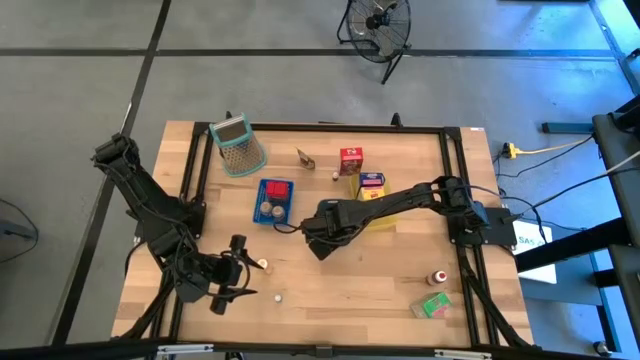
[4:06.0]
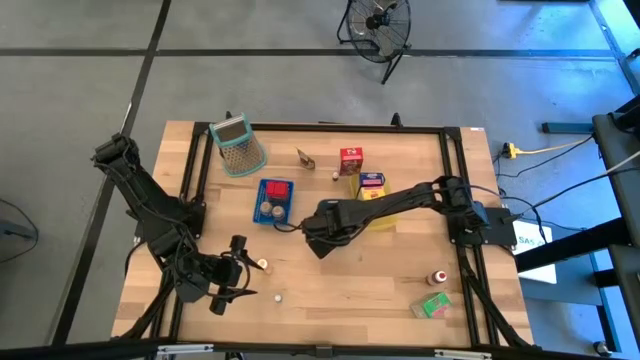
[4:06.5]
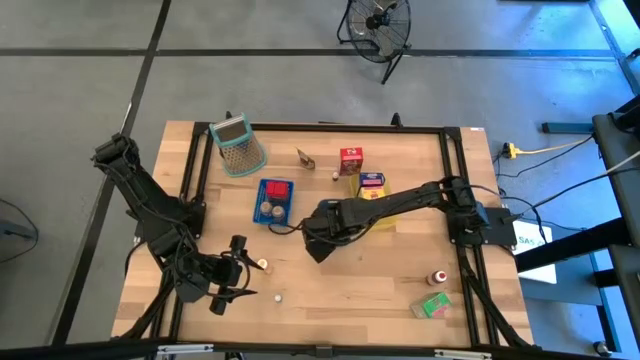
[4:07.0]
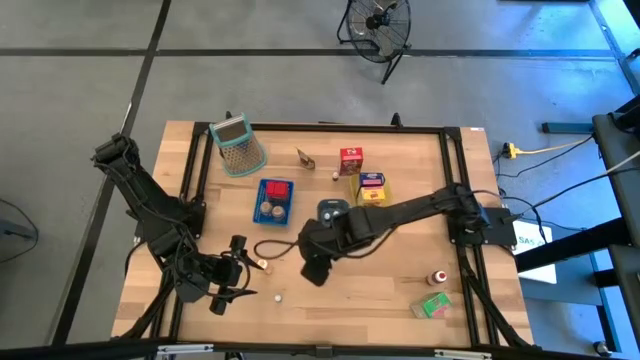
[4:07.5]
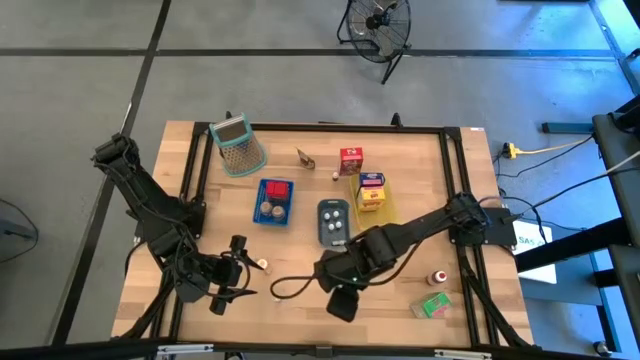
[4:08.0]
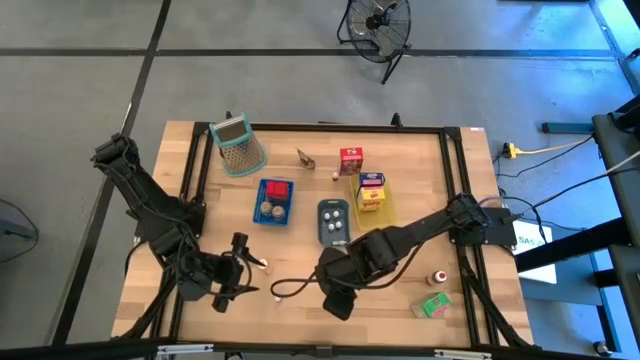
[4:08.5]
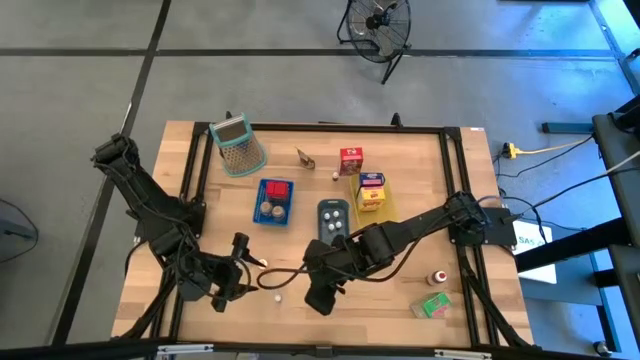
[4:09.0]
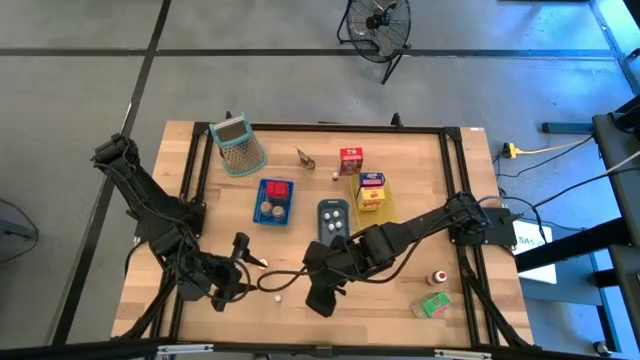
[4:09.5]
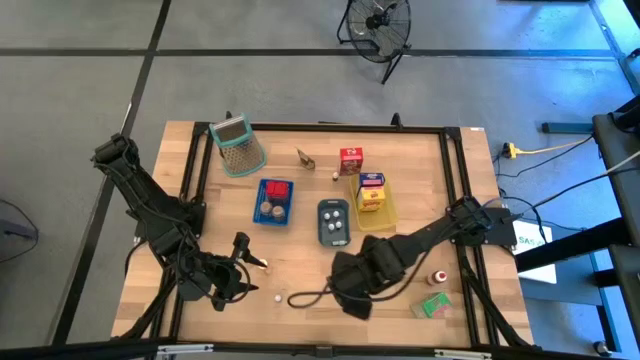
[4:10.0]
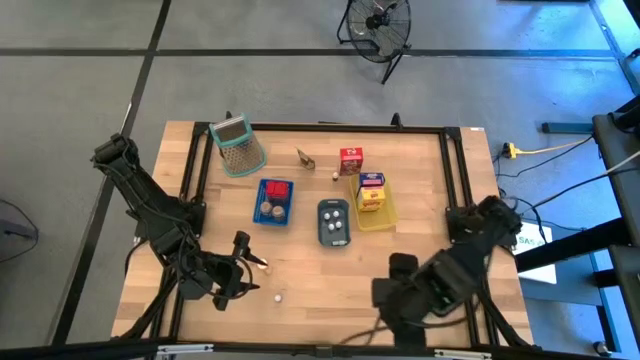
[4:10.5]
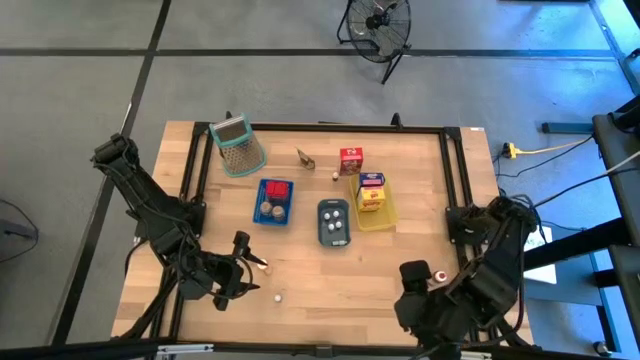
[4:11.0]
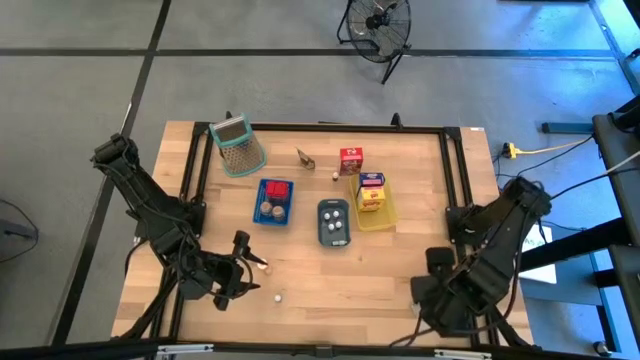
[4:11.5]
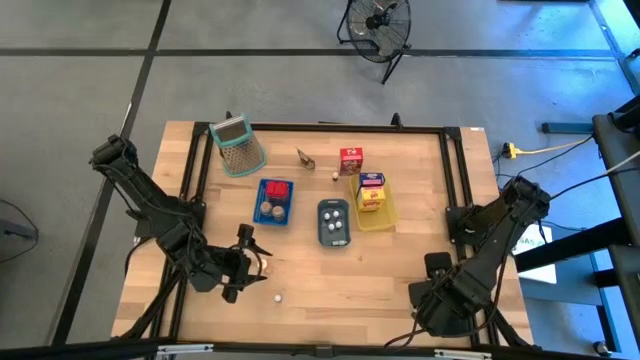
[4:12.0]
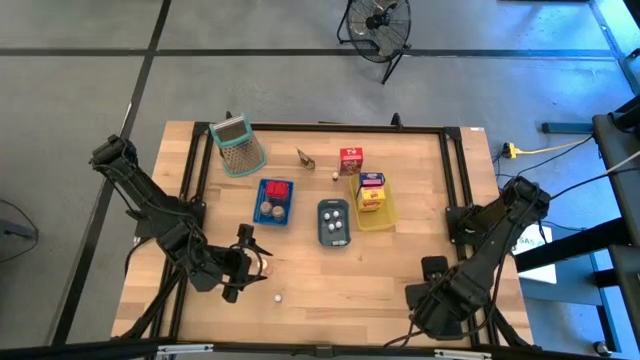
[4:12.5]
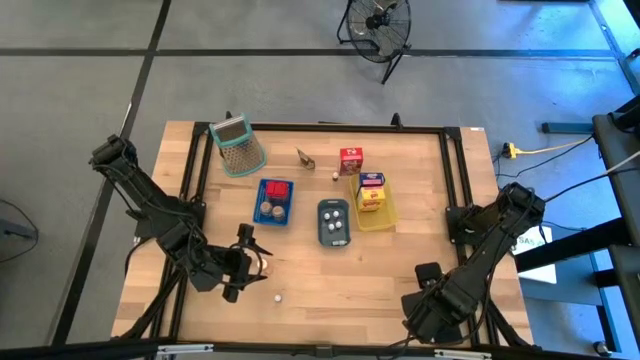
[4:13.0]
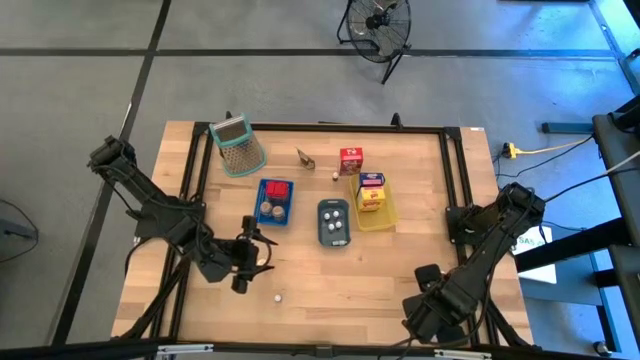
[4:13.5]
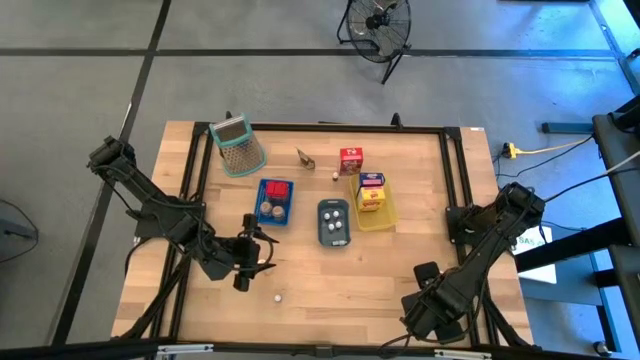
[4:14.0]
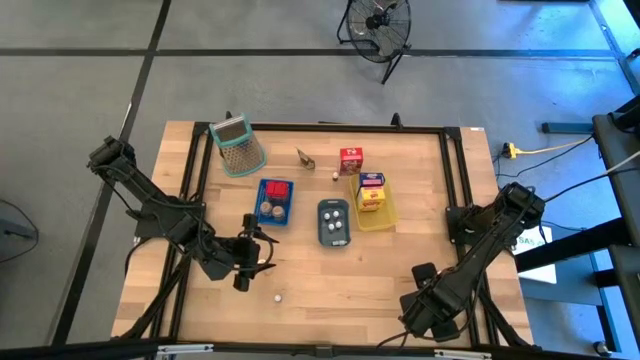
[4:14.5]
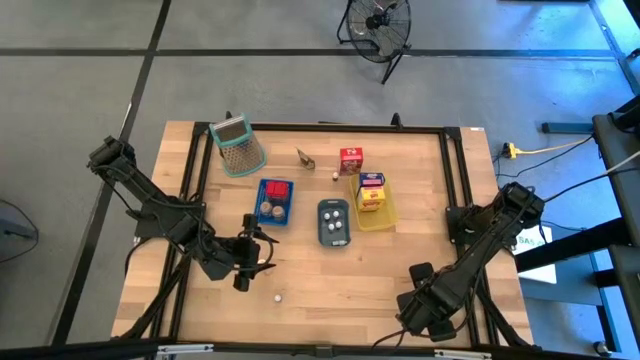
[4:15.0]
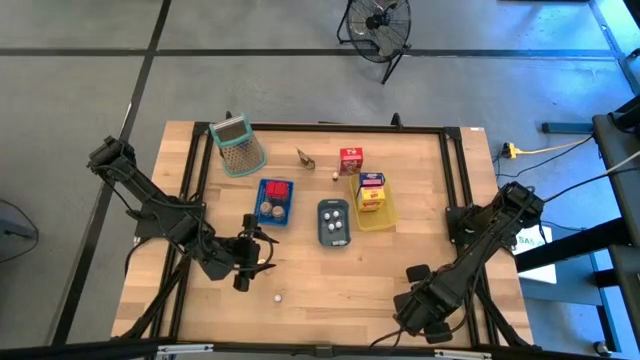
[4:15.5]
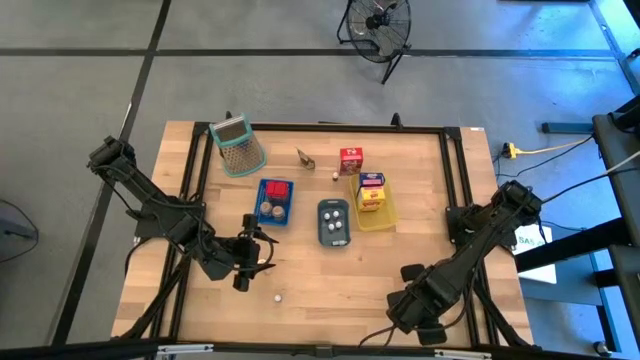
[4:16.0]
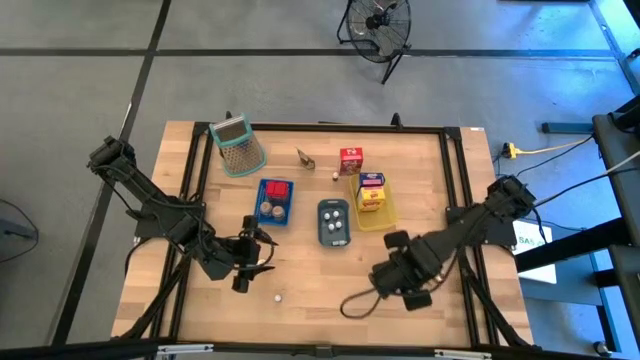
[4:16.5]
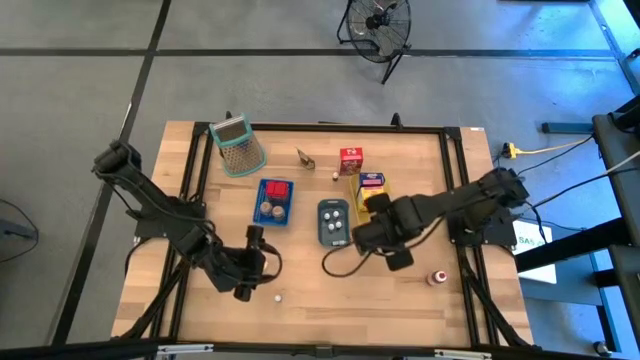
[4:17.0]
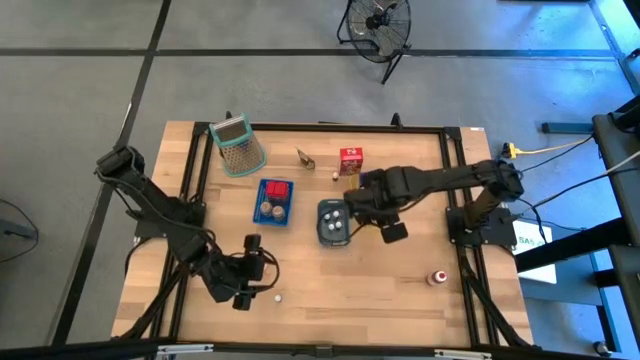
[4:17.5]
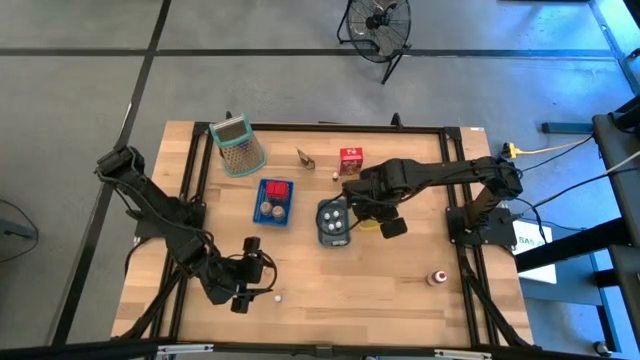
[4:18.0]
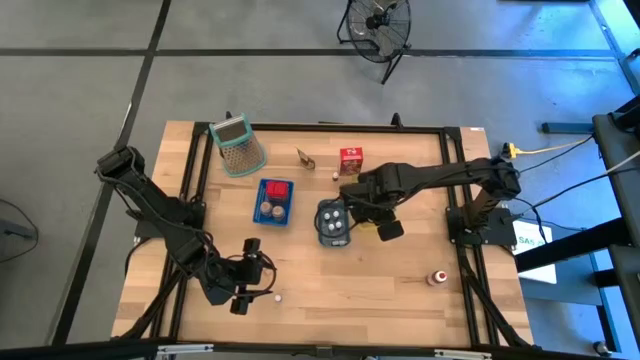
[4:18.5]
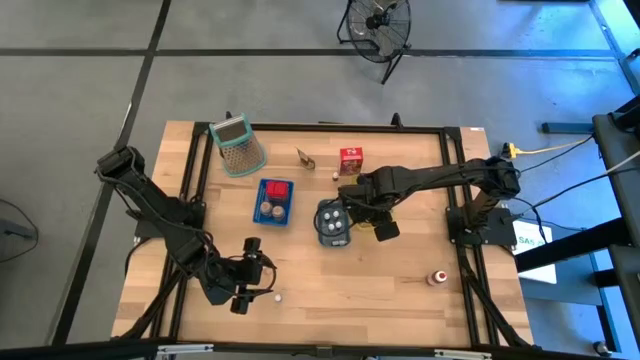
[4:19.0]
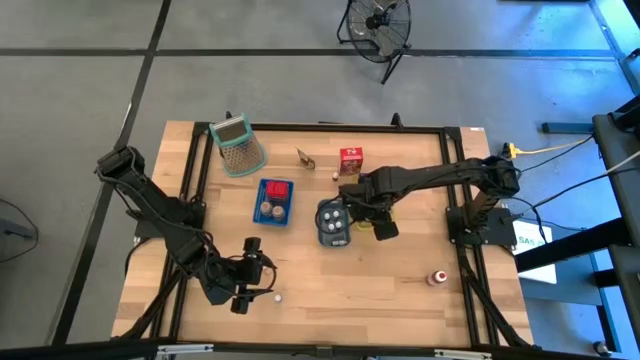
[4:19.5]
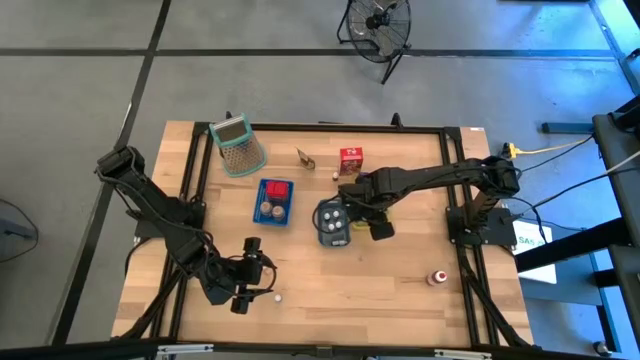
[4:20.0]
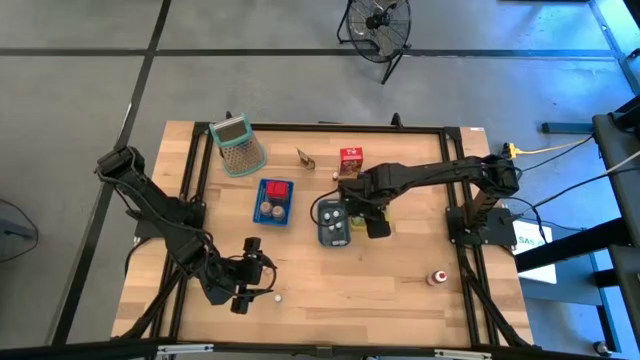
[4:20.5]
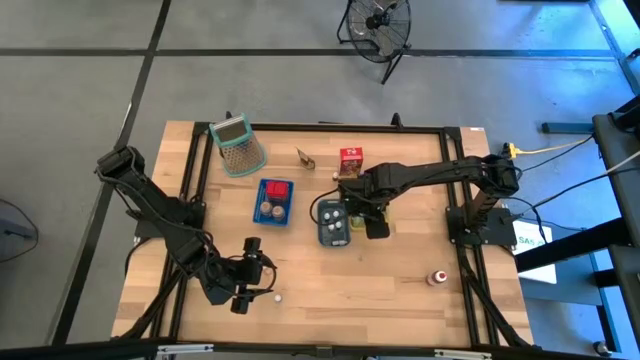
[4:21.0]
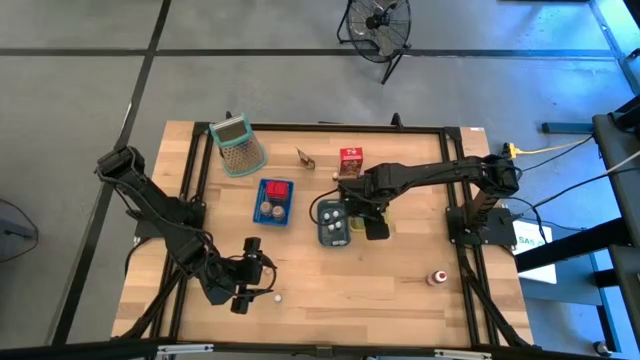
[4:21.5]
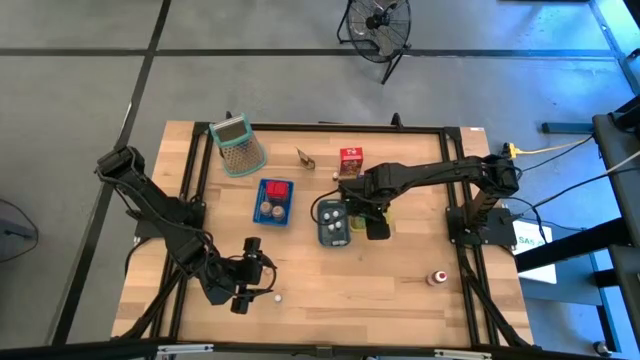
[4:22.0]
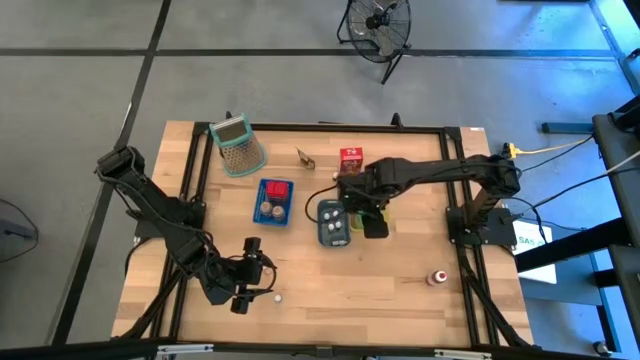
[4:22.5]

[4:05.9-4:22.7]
Task: Pick & Place Kitchen Items
Put the green cereal box into the yellow bin

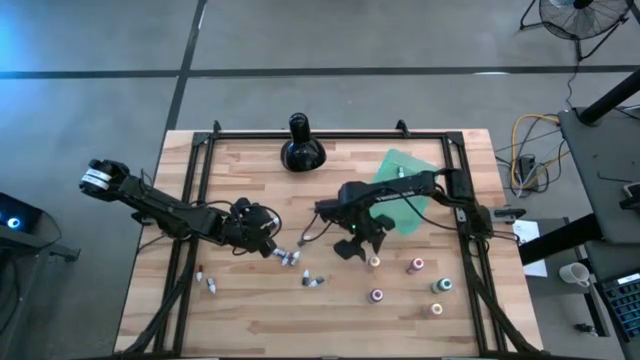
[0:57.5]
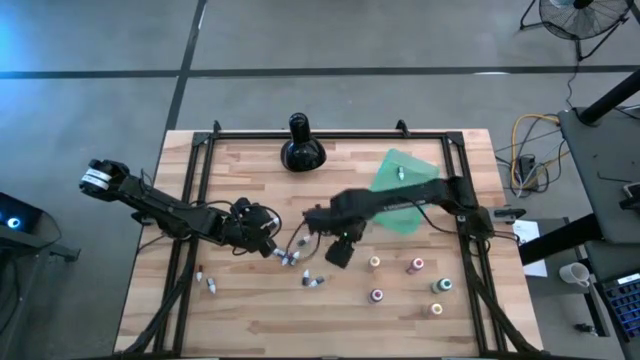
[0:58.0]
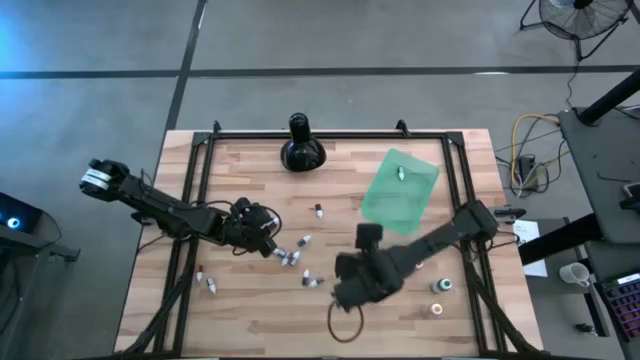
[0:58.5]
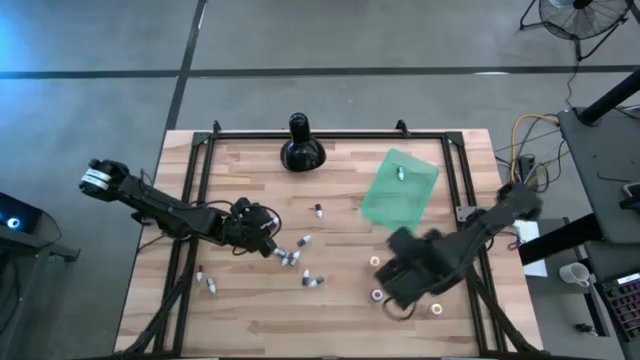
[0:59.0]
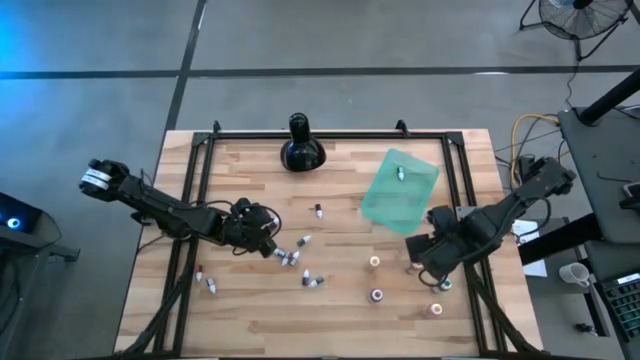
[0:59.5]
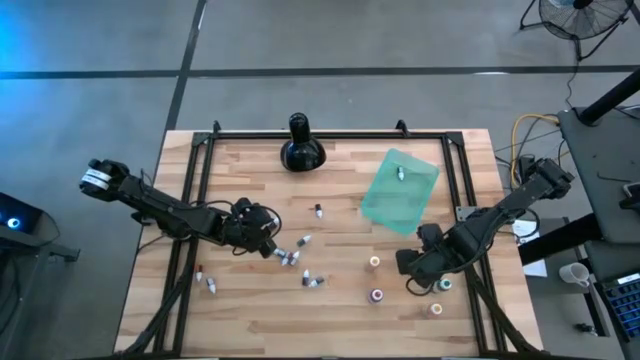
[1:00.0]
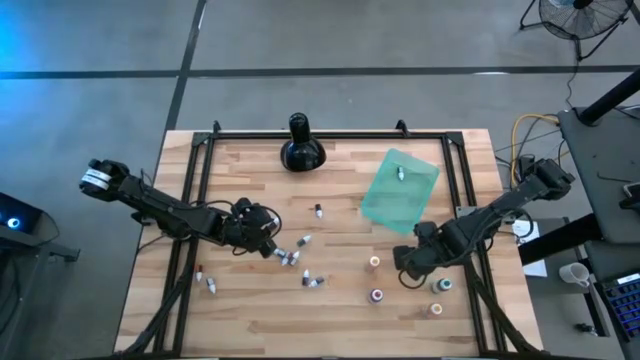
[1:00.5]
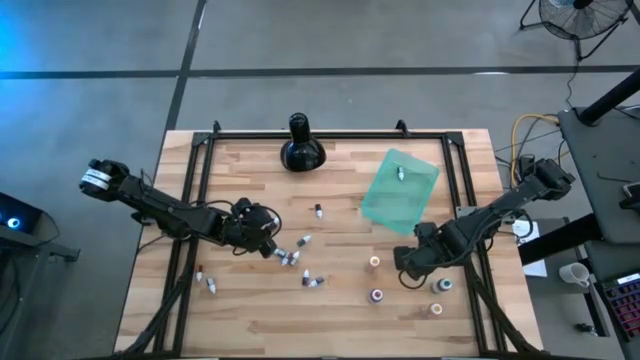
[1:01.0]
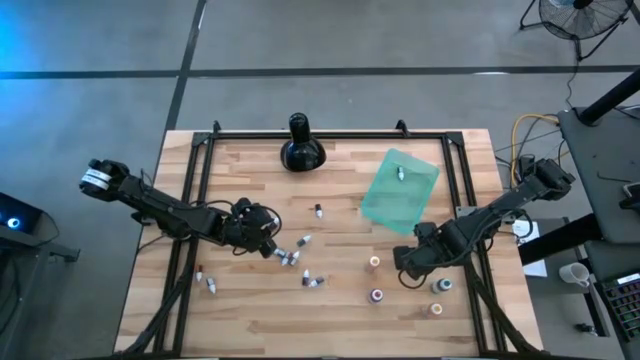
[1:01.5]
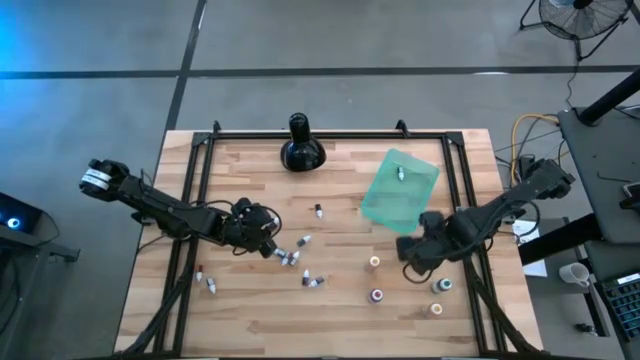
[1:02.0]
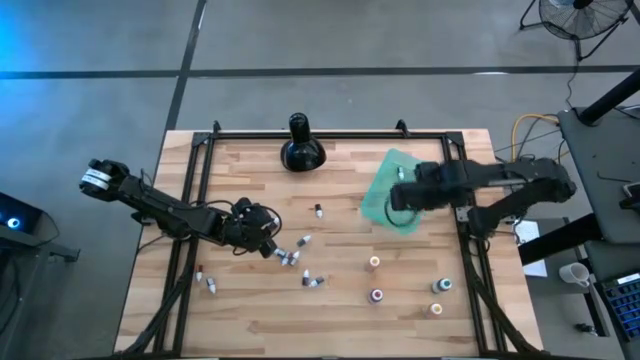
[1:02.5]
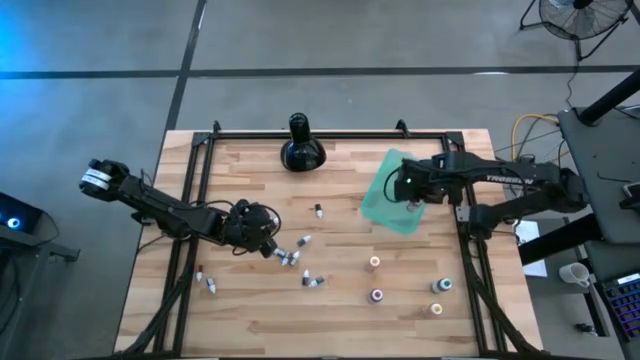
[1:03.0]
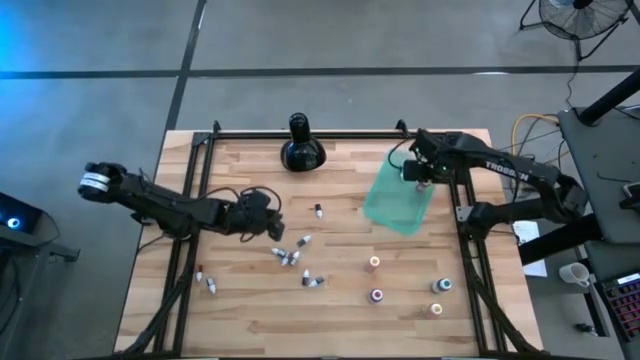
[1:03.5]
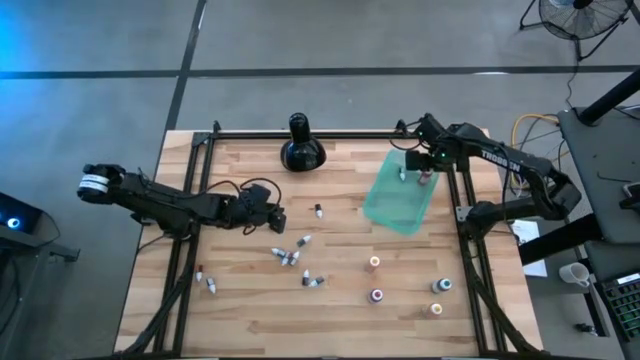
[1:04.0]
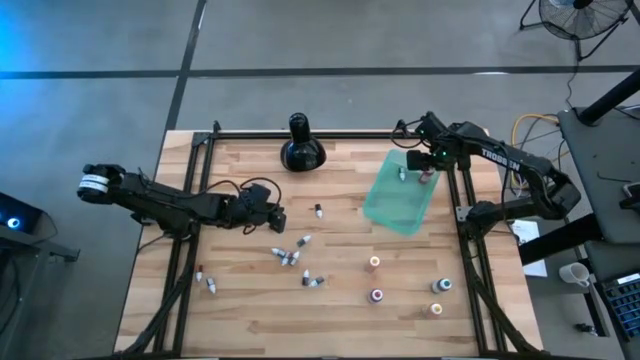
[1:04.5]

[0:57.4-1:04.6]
Task: Pick & Place food coloring
Put the large orange food coloring bottle into the green bin
